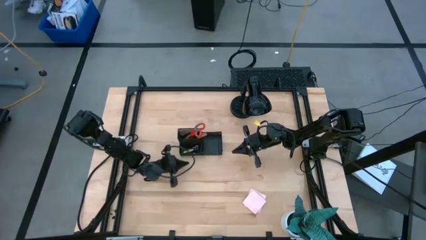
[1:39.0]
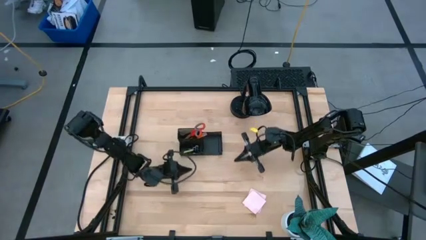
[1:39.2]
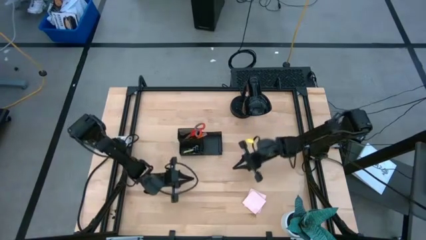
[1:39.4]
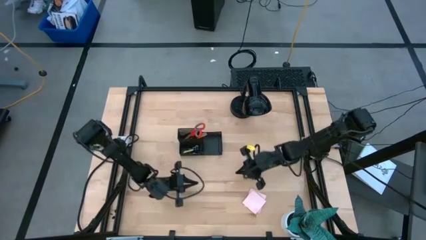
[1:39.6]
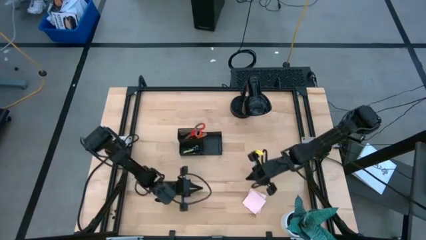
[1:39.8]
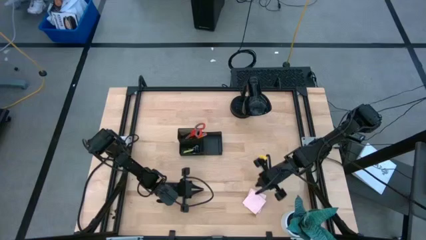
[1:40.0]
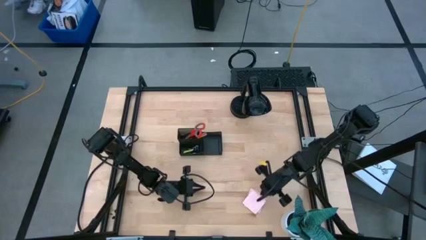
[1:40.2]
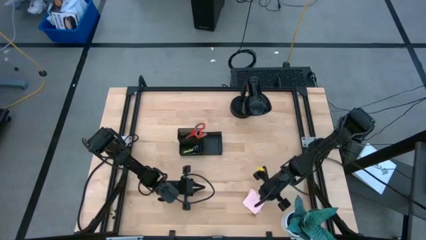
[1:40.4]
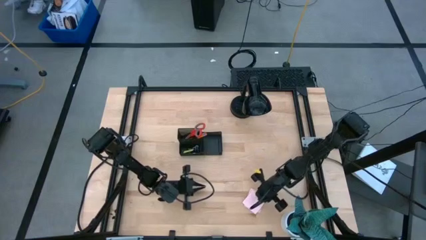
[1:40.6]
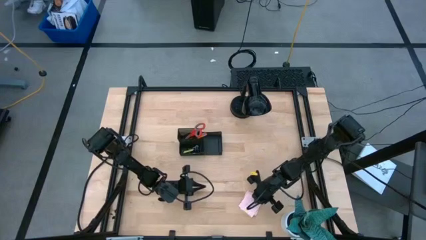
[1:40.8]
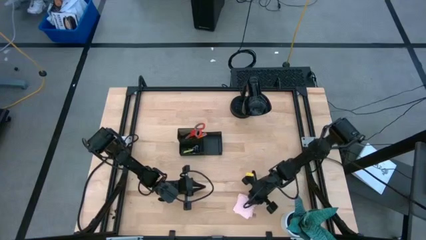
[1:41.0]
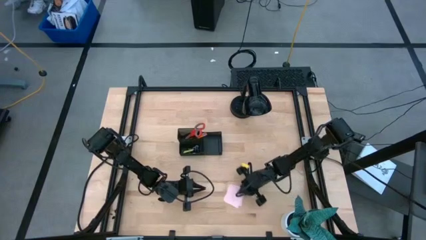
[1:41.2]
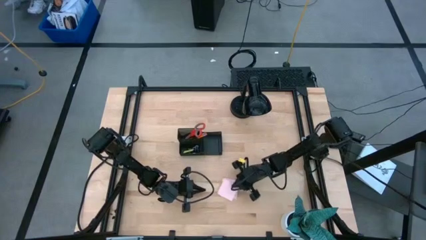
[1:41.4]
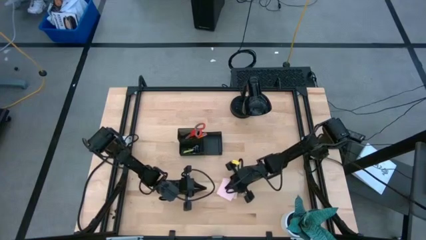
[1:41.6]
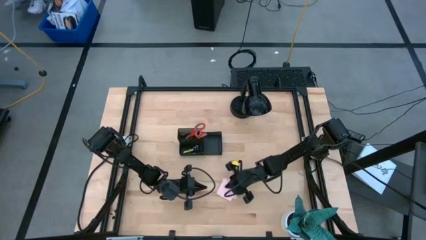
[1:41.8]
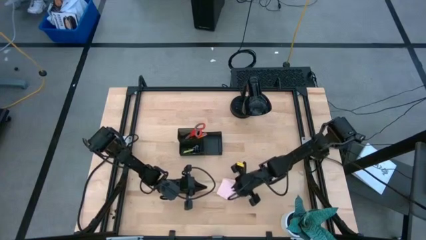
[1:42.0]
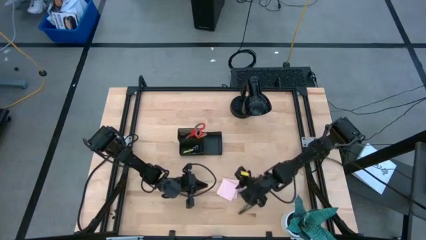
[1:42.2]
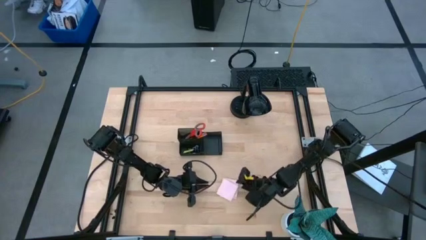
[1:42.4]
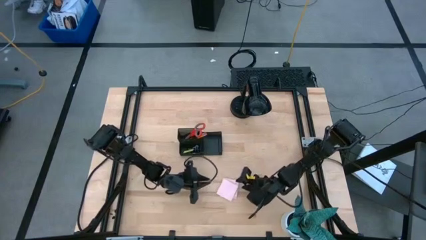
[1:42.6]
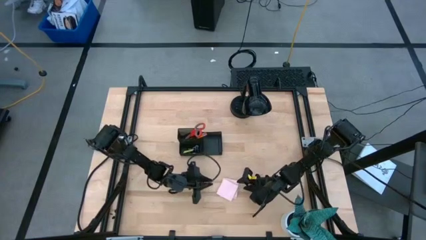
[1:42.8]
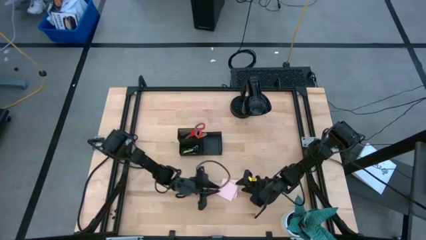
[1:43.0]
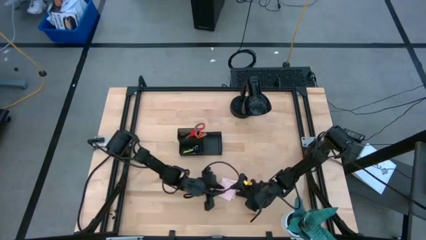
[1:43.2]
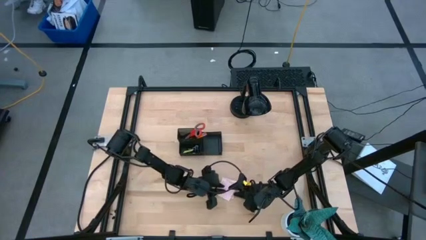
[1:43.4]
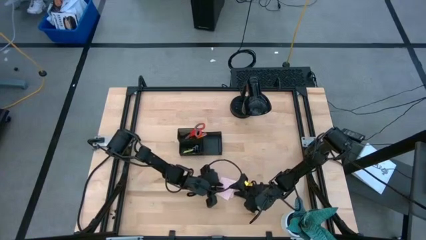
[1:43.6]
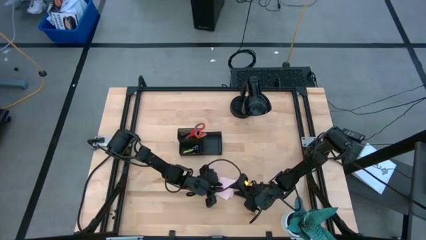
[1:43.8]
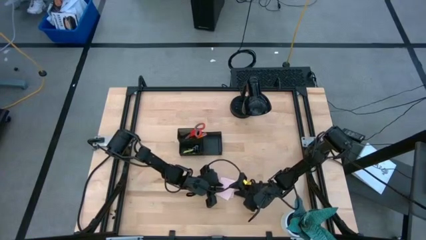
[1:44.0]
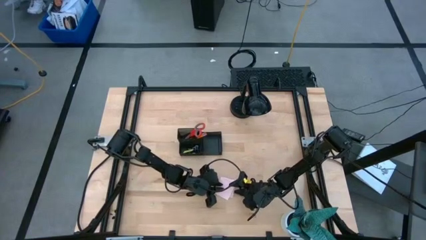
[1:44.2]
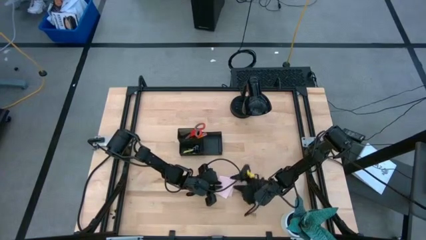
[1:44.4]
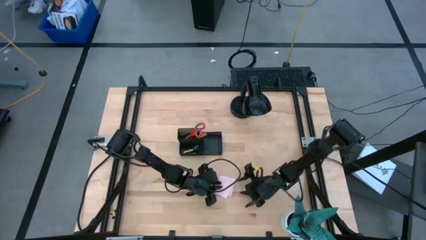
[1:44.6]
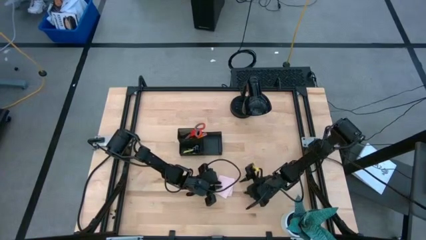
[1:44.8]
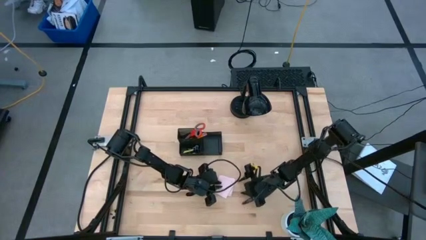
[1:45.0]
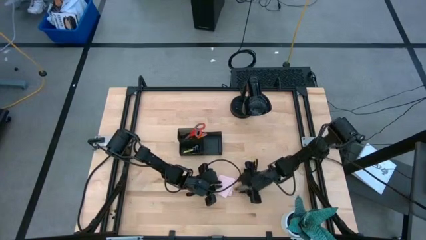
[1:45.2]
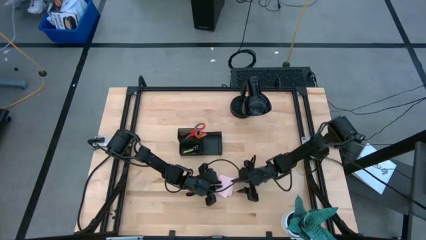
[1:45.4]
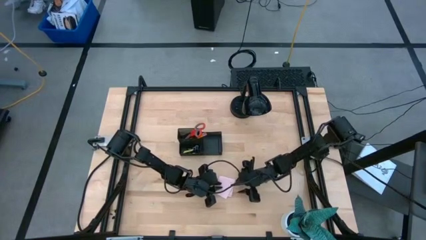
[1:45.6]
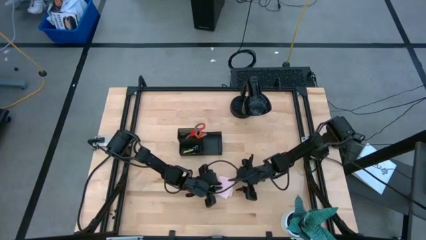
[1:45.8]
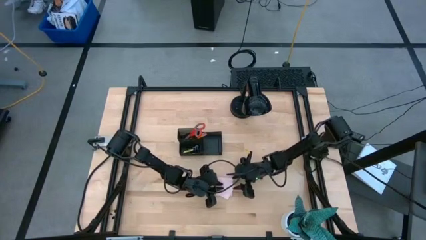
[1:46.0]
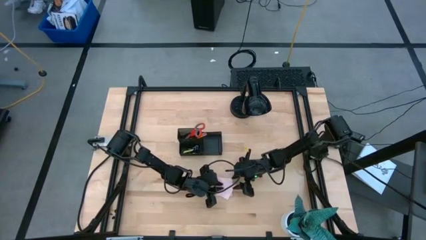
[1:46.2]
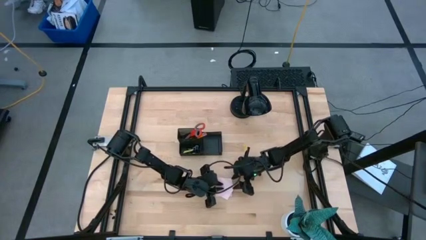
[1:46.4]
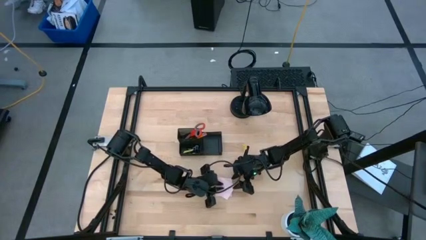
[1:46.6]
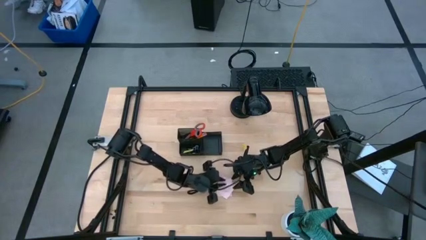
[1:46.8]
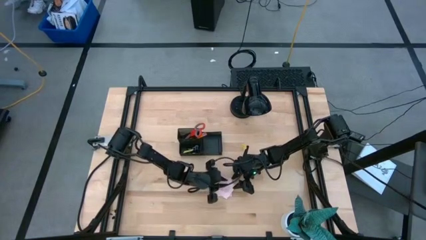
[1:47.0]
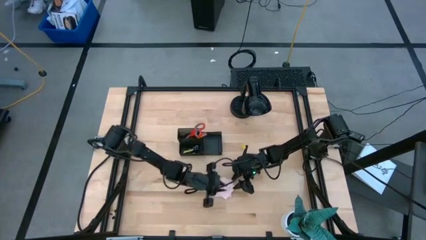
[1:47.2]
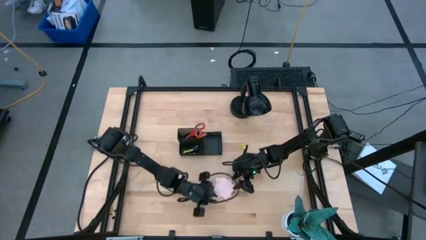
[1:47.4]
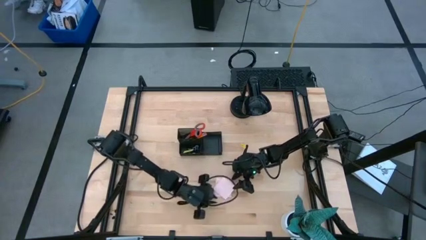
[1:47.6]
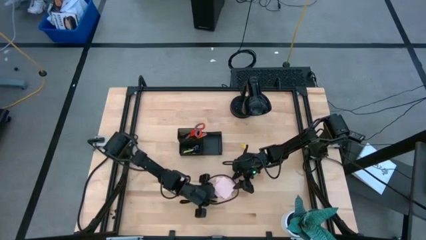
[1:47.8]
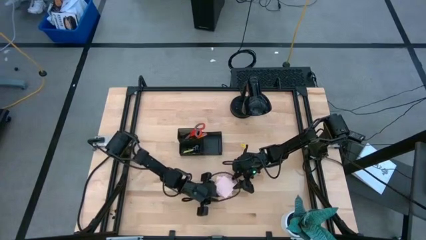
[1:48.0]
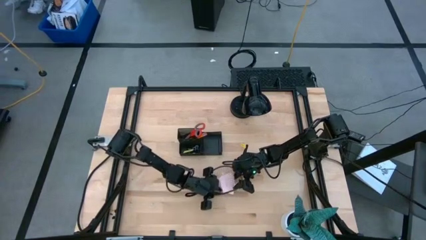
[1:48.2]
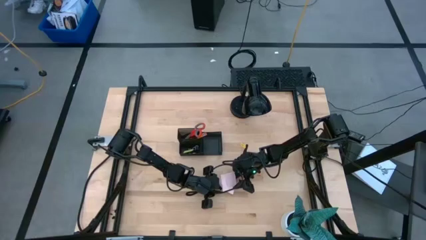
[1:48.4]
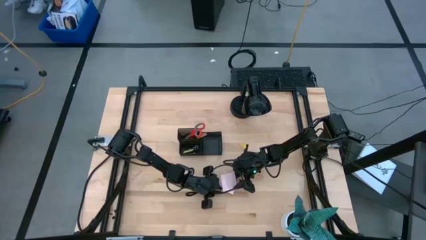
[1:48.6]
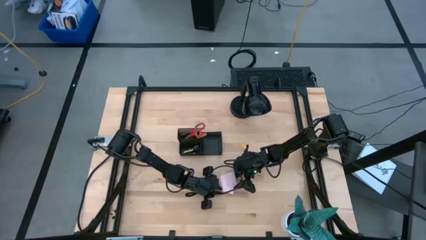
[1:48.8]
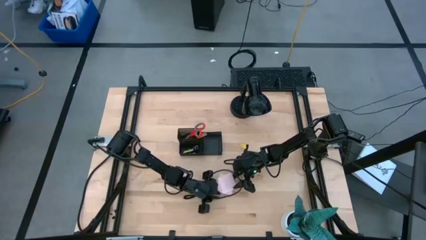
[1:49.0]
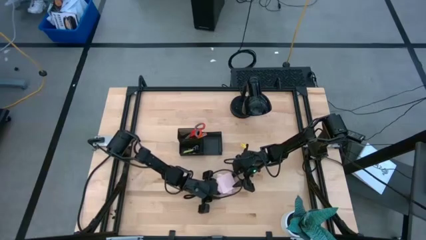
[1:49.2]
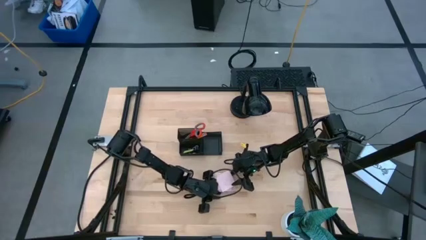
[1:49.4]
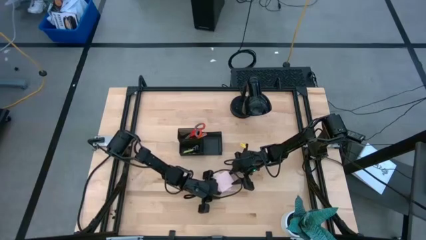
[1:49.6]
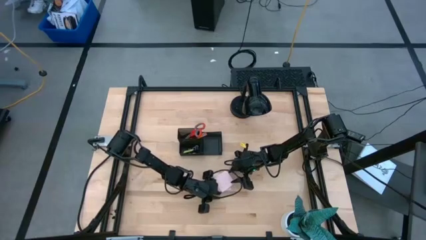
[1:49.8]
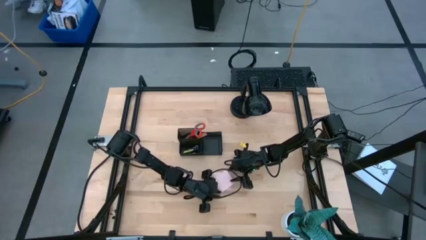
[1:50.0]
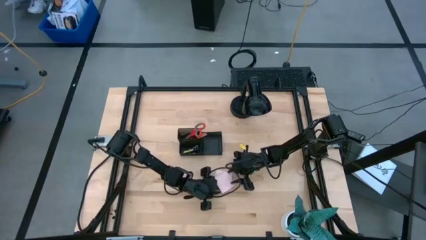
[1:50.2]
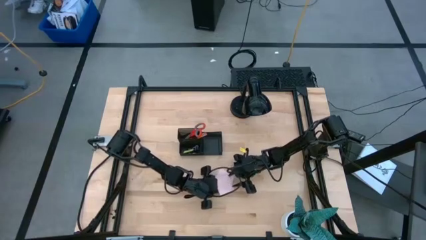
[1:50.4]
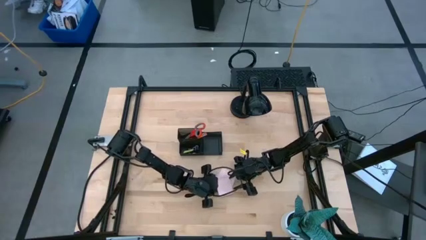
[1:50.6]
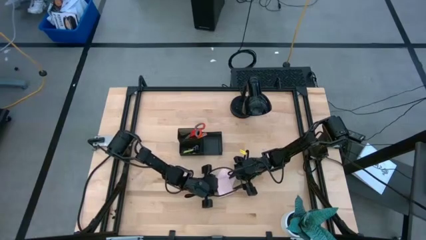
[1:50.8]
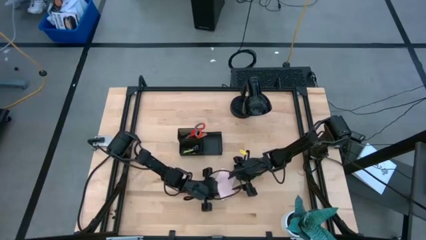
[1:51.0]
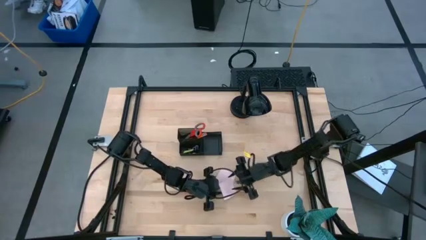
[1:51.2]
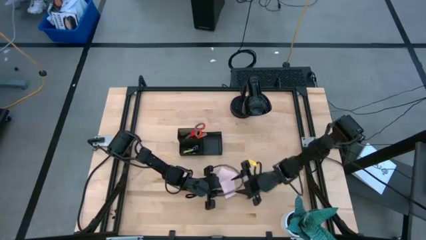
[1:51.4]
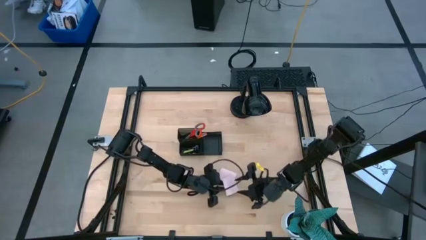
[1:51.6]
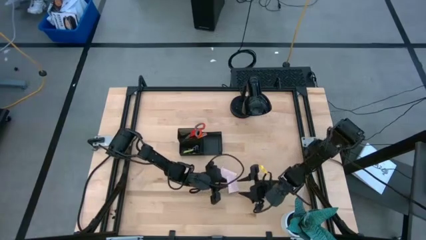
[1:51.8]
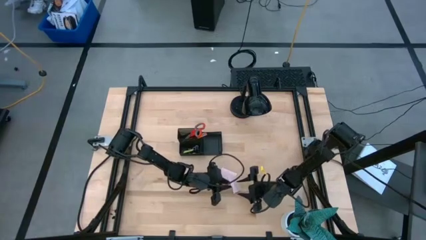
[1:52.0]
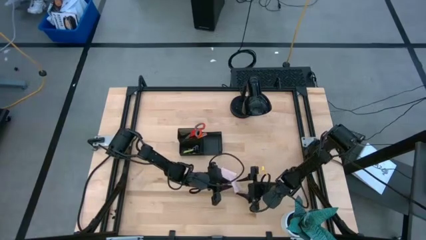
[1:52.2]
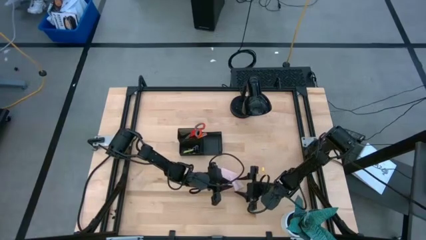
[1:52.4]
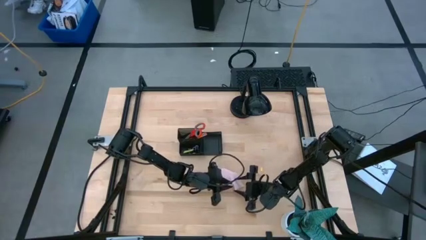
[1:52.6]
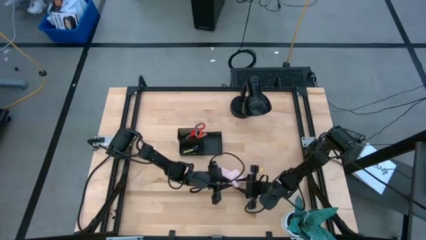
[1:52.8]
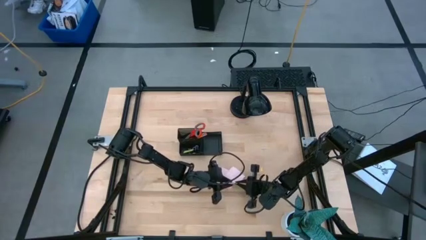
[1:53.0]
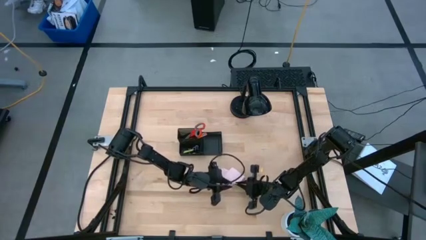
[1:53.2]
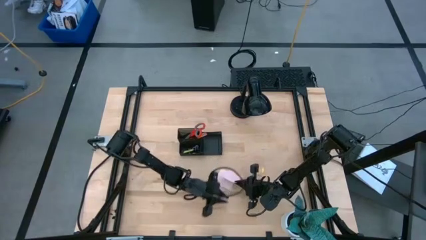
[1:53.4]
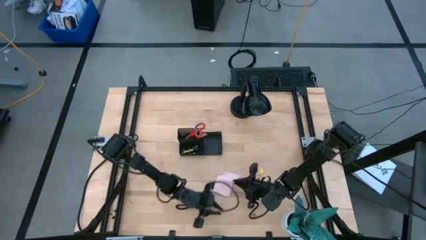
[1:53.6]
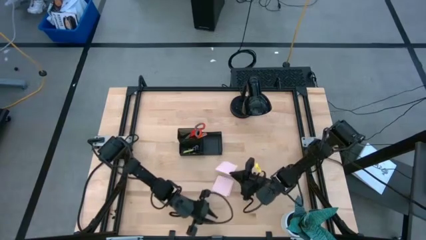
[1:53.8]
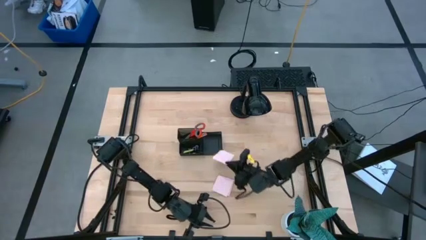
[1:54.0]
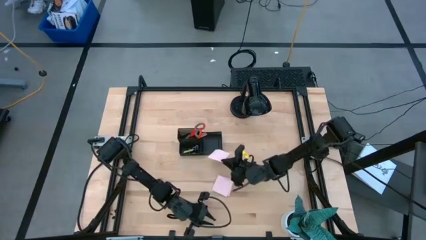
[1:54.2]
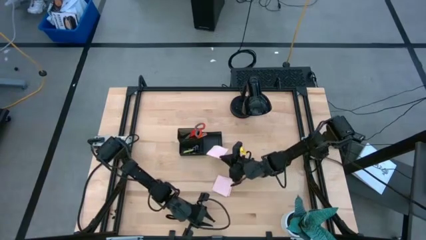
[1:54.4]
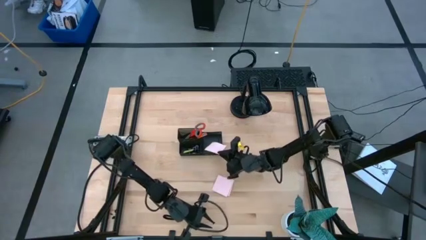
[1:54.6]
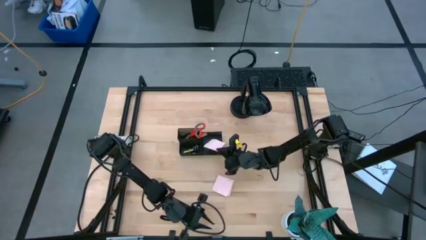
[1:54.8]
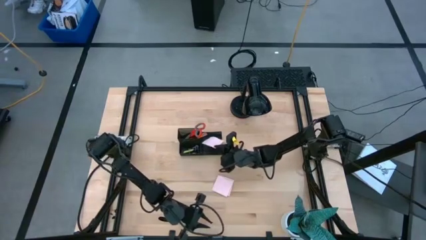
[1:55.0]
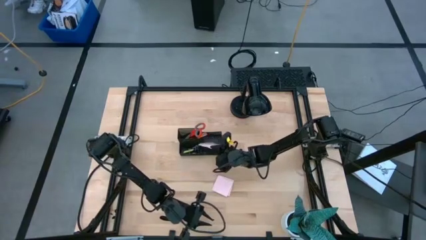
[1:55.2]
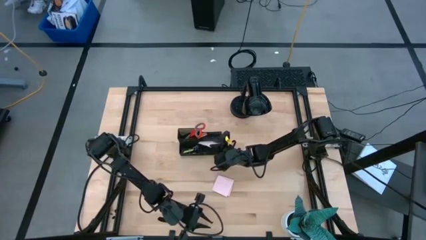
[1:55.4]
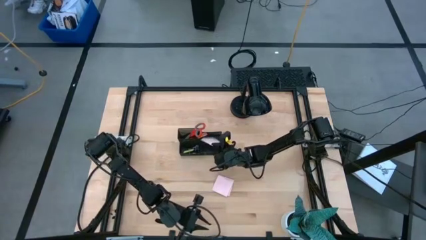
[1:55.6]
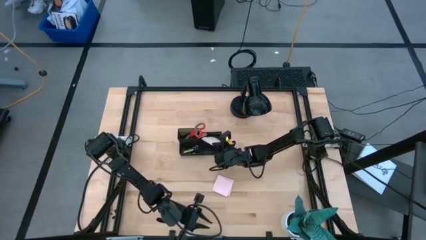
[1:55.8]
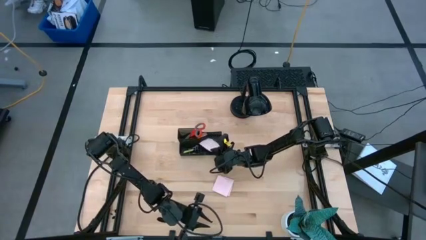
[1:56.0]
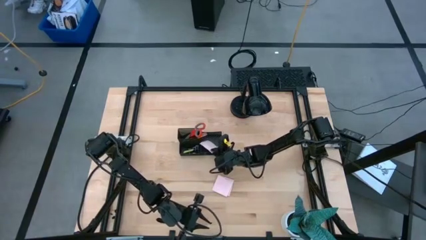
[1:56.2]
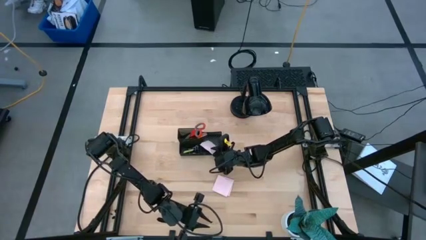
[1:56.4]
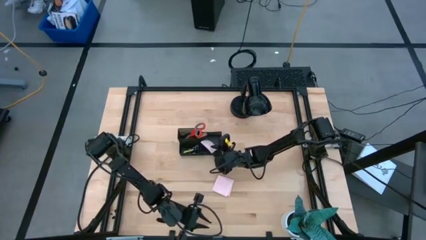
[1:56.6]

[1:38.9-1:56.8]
Task: Pick and place office supplies into organizer
Put the pink sticky notes into the black desk organizer
